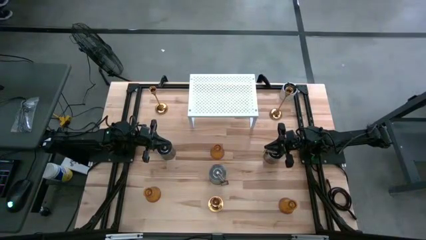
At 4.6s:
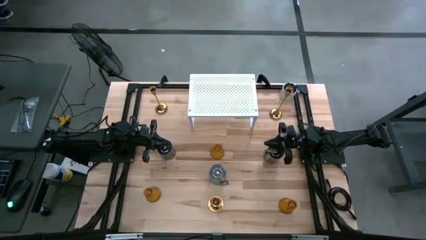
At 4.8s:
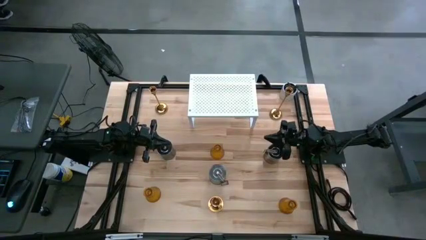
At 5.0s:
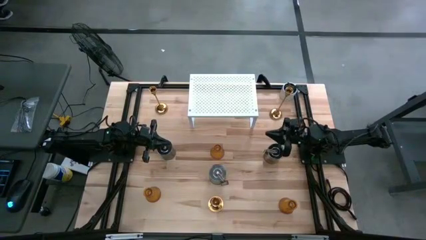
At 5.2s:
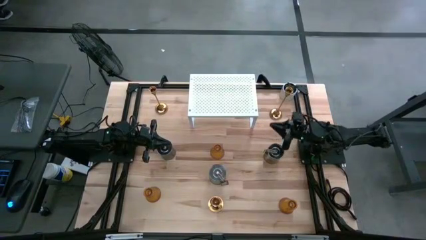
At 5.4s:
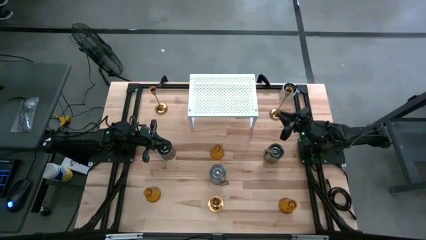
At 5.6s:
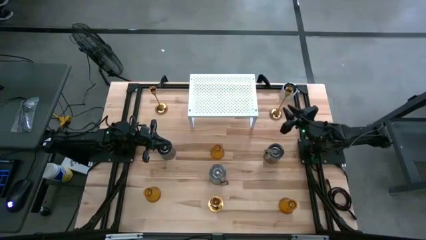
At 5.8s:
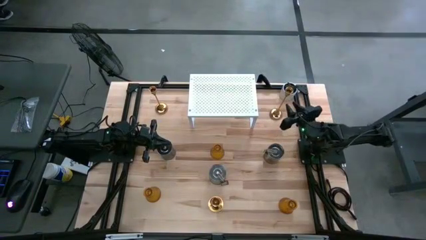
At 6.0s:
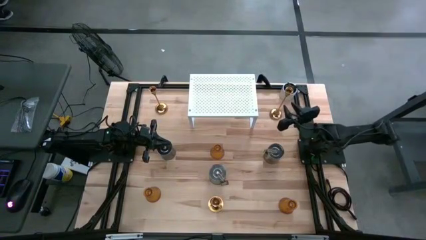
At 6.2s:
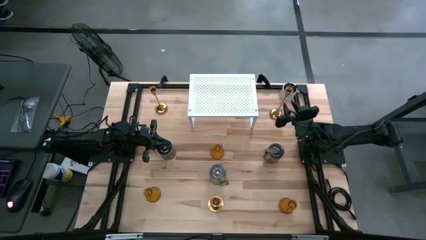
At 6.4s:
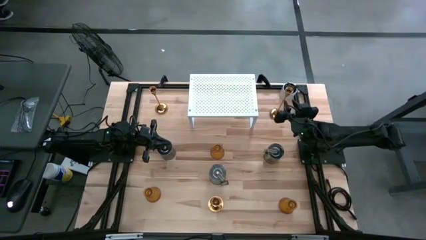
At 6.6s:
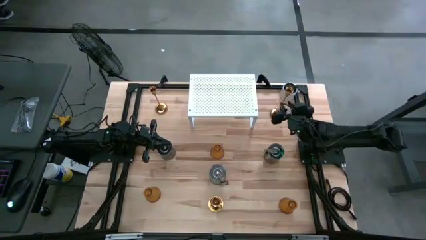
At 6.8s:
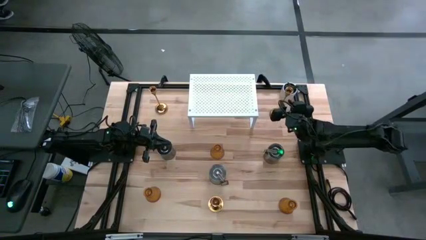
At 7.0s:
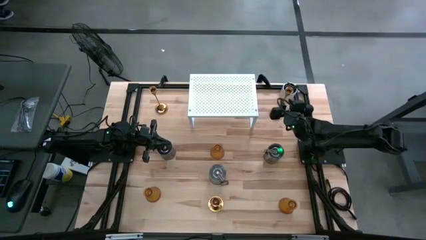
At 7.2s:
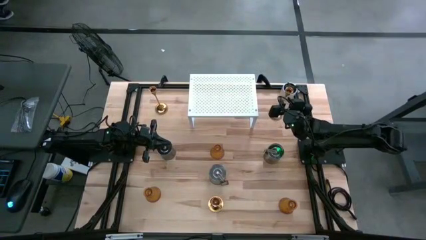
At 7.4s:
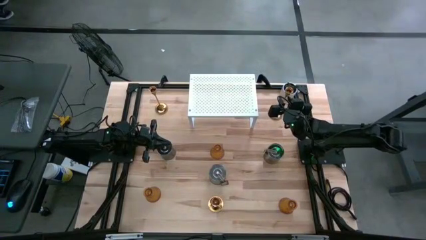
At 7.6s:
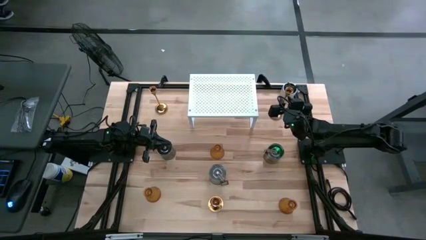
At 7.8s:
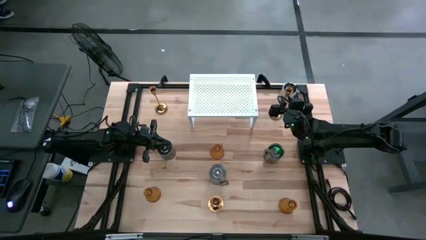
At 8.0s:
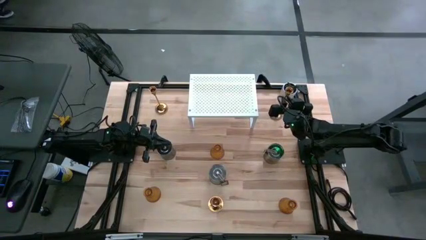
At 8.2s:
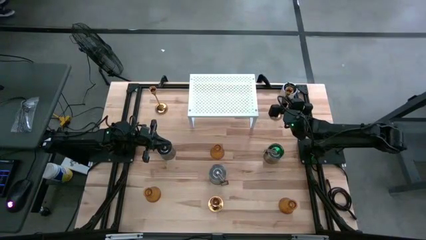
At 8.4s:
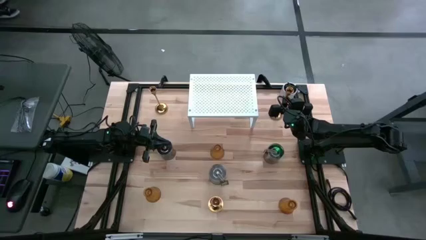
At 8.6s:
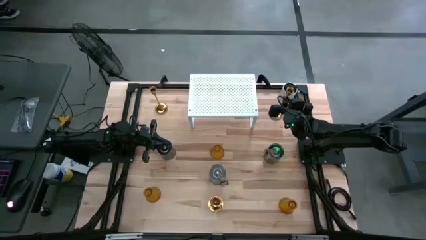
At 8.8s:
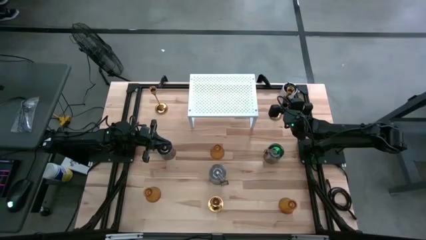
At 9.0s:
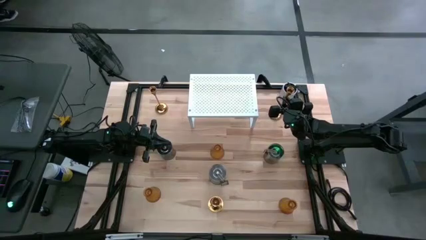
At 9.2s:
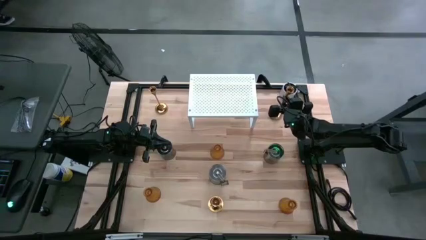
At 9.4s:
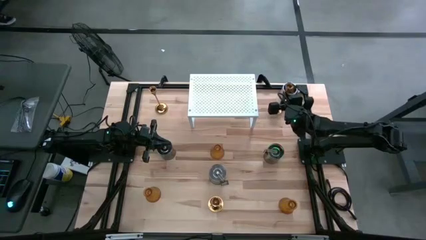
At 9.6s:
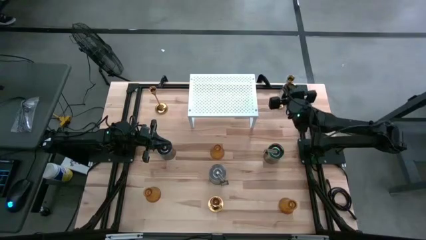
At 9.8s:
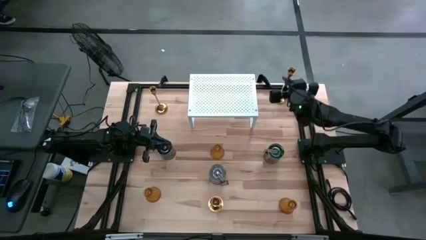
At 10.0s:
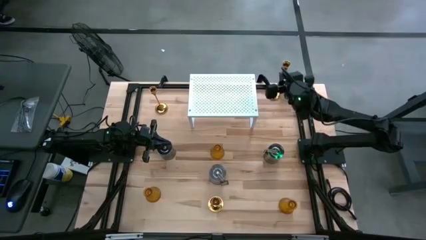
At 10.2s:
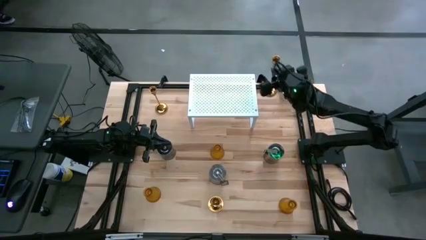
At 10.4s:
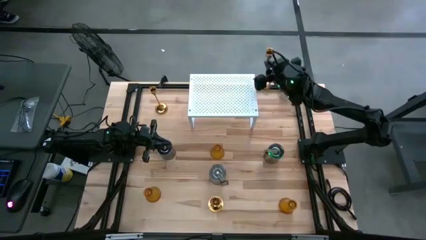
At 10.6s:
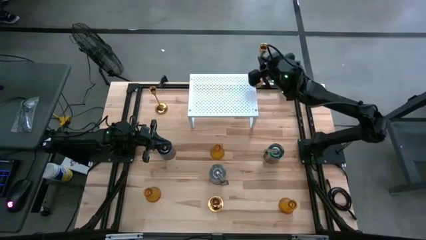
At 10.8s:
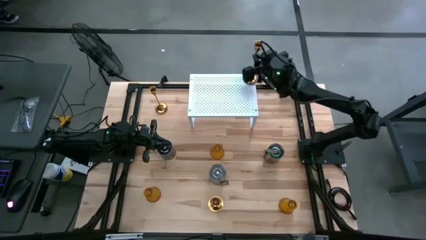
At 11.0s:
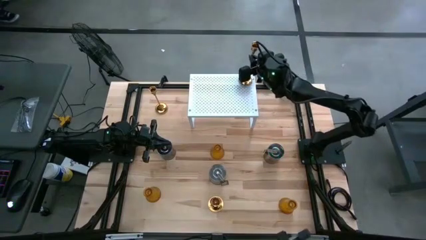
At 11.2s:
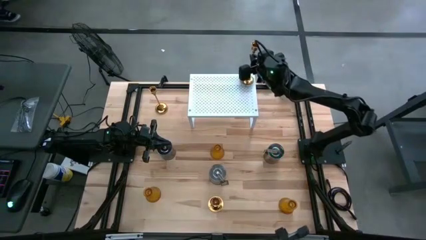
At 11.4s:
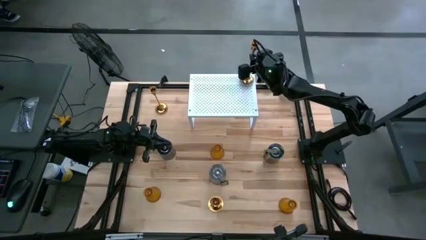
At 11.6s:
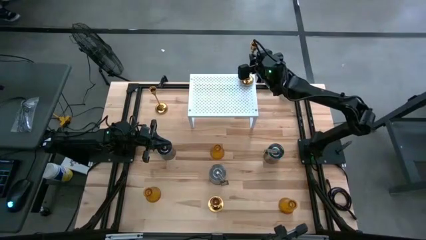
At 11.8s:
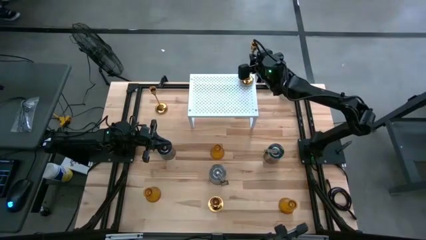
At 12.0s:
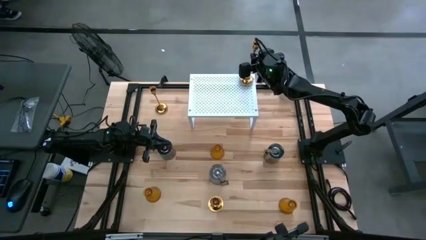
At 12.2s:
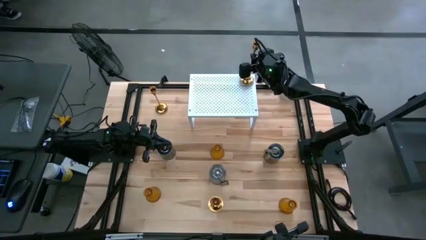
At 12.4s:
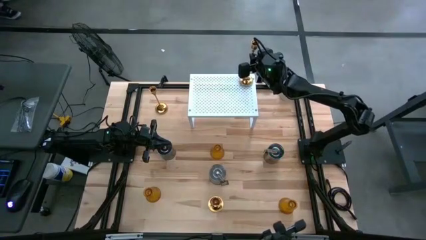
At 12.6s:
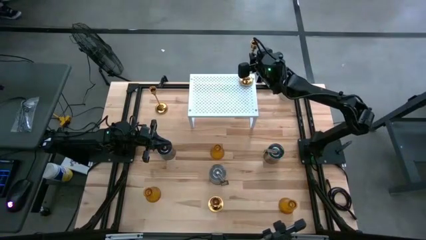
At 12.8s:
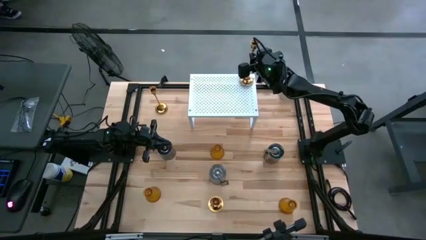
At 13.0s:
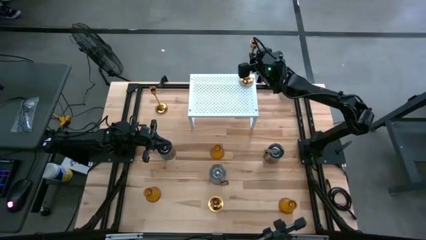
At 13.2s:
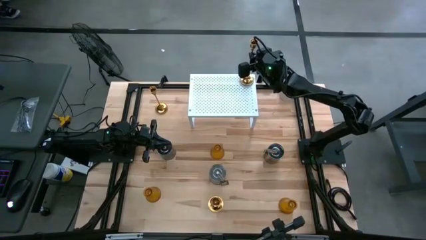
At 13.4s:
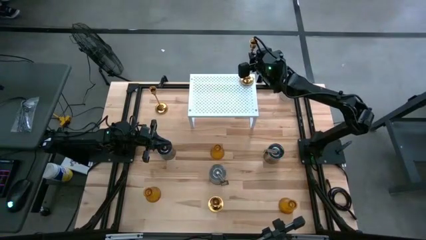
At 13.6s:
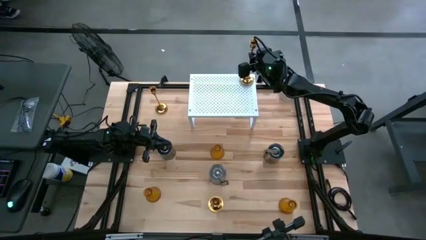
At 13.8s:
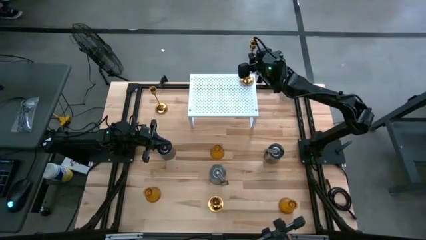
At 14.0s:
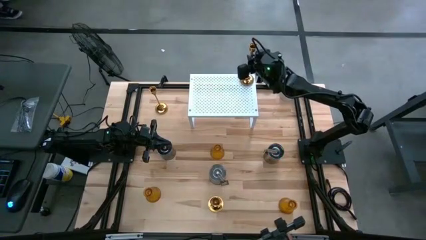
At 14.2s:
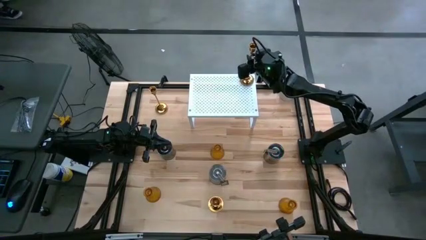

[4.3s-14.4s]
Task: Pick & Place candle stick holders
Put the top right gold candle holder on the shelf

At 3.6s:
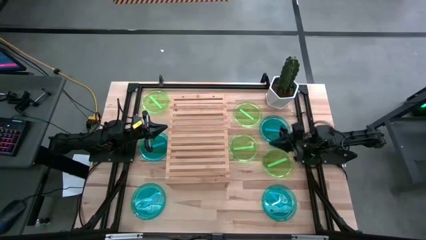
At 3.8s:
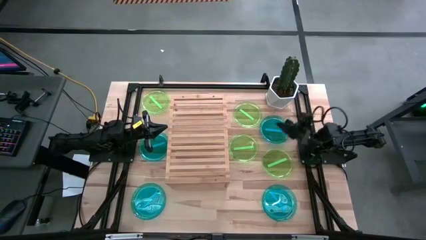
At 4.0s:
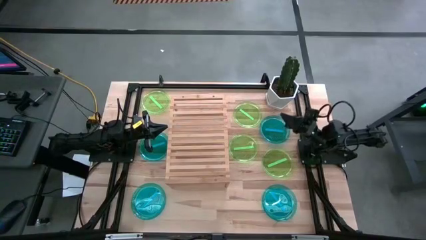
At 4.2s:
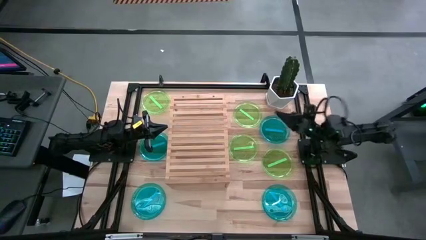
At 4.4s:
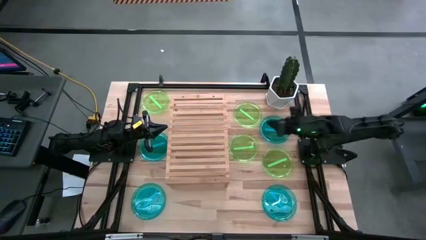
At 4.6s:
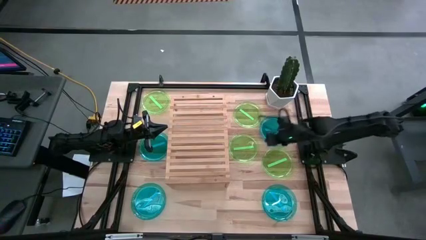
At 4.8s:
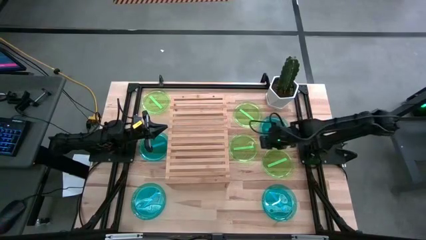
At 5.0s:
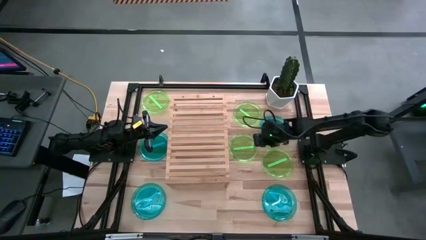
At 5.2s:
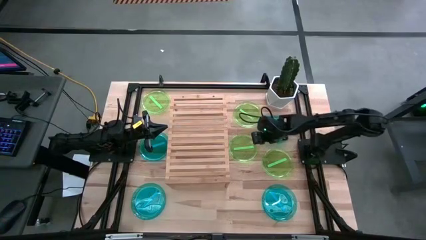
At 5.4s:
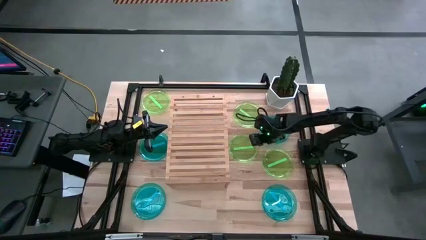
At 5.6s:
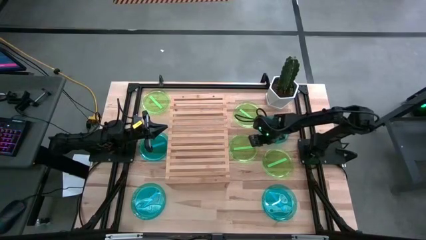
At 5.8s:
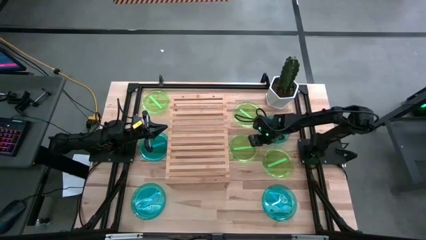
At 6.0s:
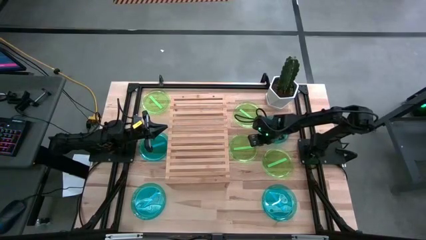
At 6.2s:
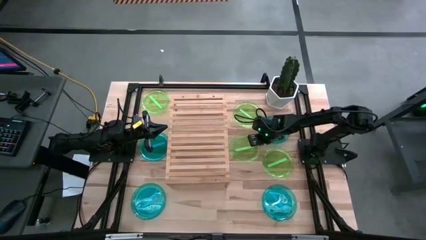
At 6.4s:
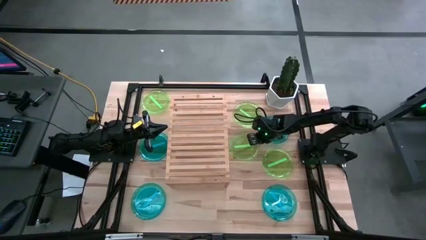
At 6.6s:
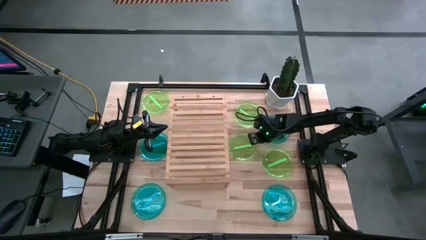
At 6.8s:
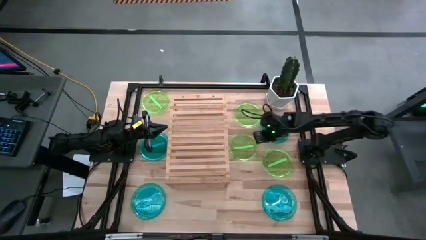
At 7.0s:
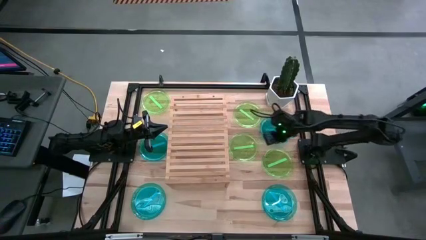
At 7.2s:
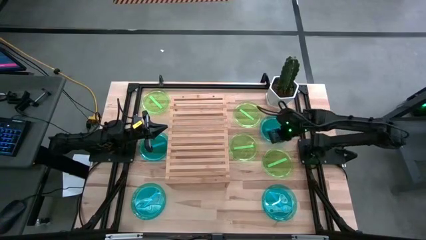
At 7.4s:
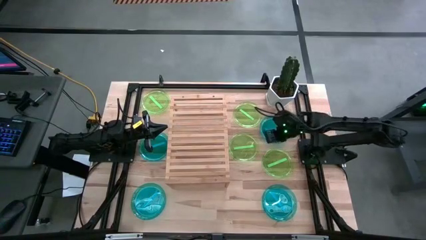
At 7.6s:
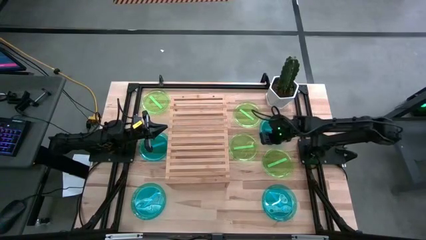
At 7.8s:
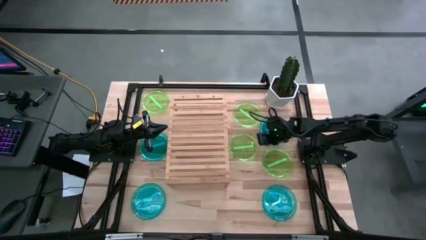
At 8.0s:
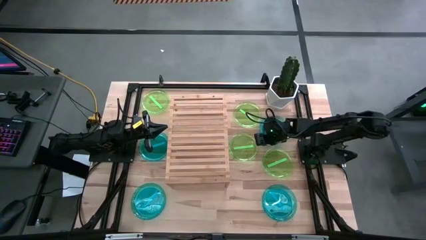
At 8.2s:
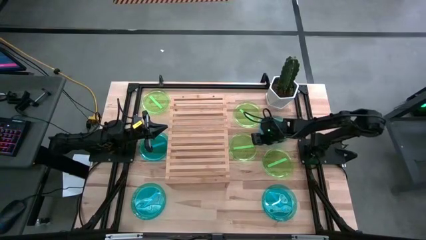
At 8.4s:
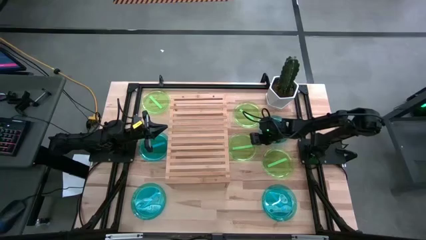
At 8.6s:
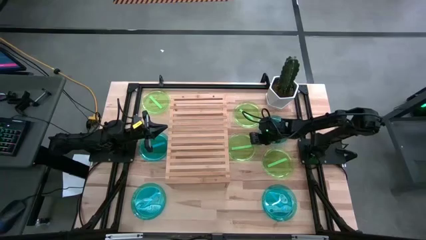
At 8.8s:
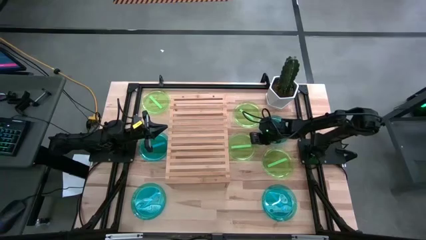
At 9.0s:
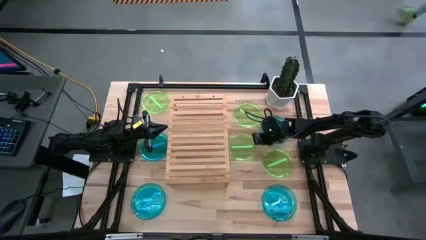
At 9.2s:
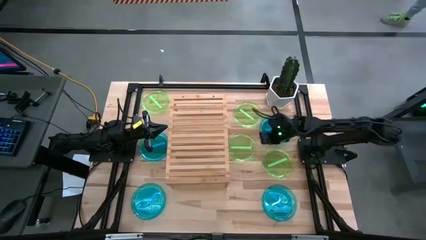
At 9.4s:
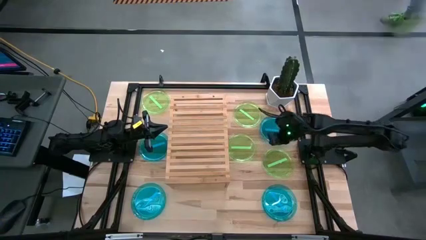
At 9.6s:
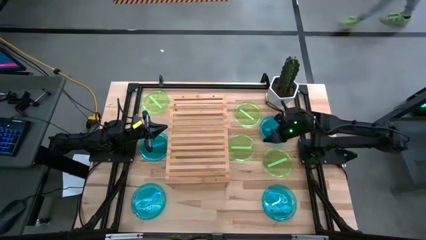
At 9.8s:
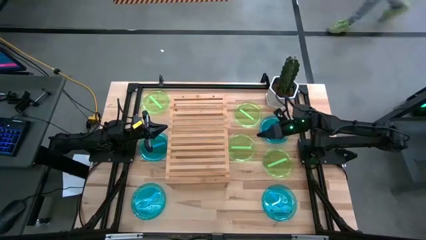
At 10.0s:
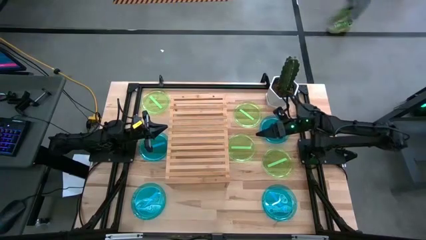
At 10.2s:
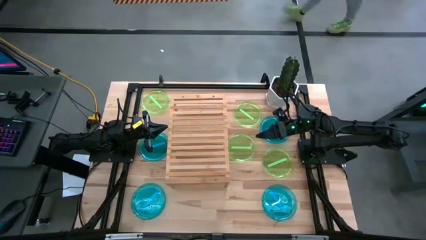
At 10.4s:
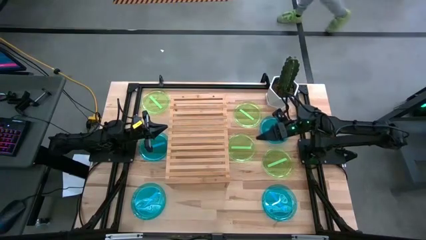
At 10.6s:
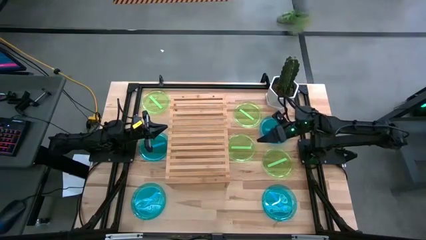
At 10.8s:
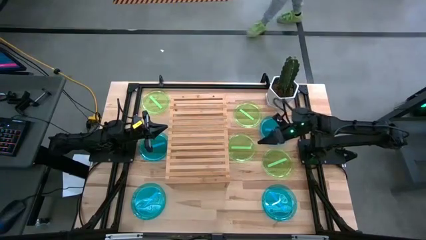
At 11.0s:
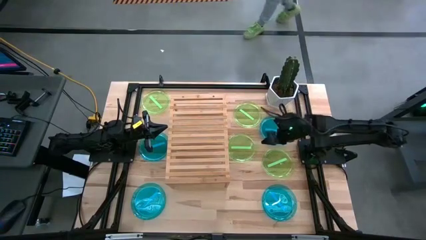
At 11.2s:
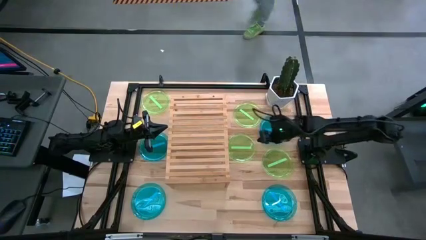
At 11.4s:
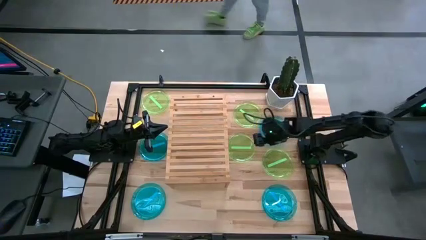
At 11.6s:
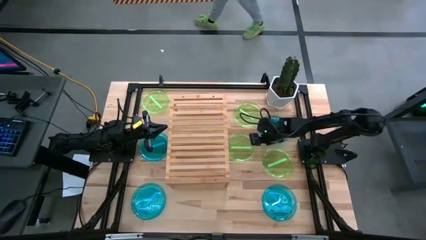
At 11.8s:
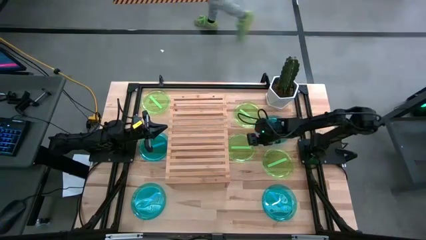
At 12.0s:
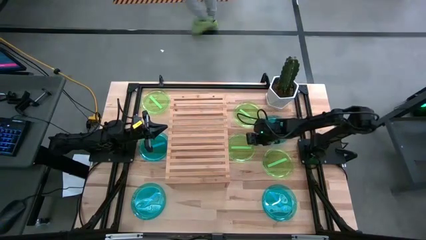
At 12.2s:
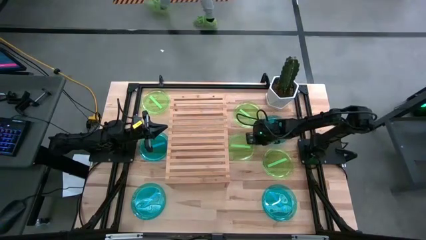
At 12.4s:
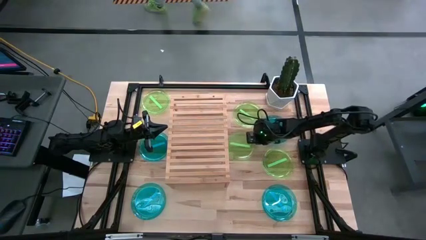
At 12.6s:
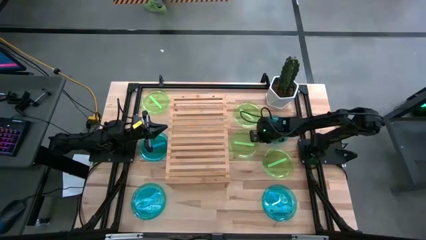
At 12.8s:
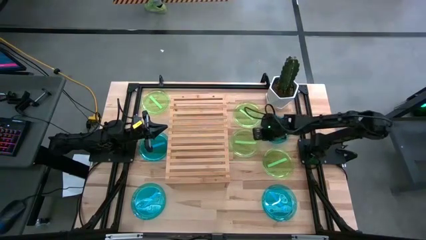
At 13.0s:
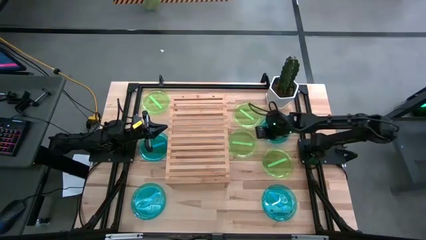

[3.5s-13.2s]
Task: Place and stack plates onto a shelf
Put the middle green plate on the shelf
